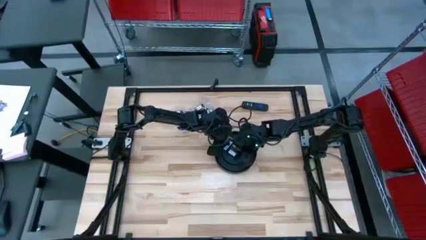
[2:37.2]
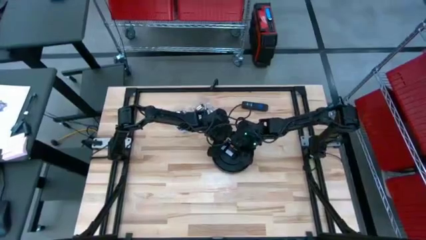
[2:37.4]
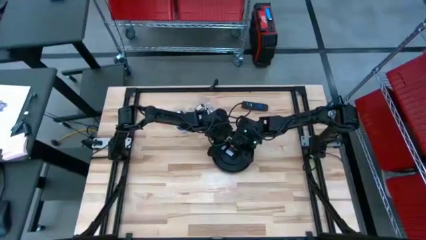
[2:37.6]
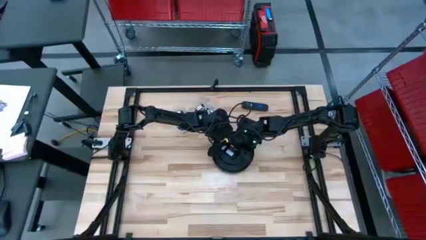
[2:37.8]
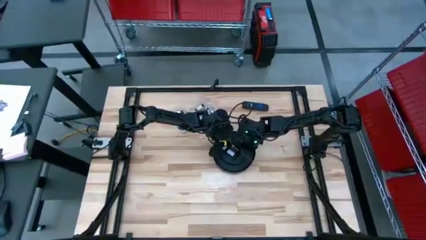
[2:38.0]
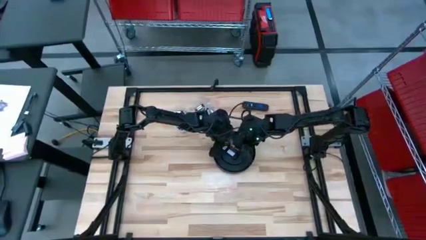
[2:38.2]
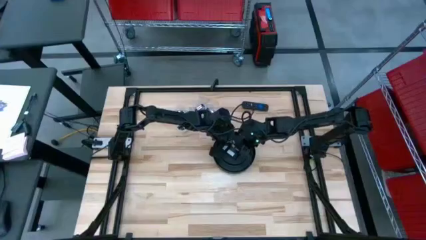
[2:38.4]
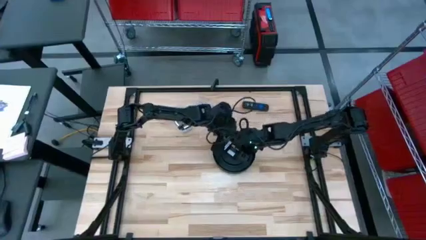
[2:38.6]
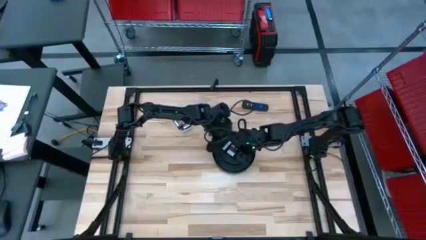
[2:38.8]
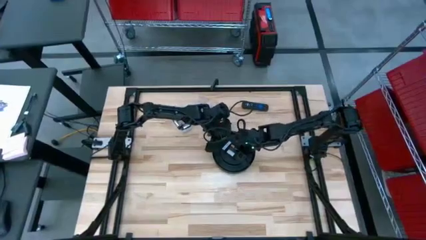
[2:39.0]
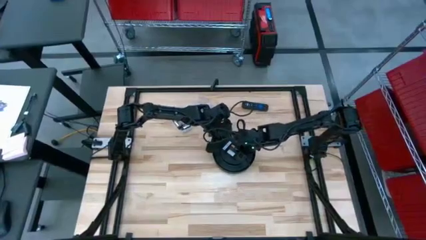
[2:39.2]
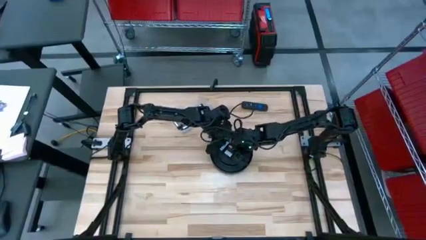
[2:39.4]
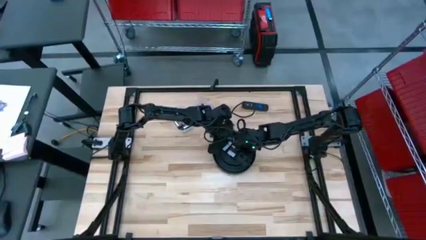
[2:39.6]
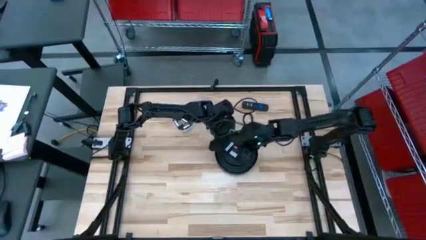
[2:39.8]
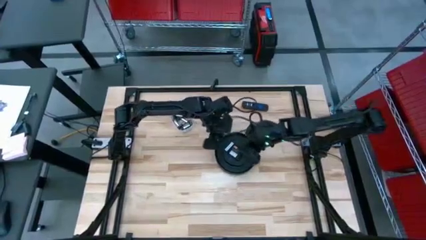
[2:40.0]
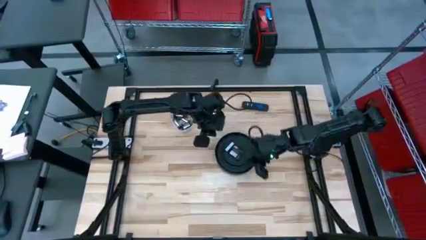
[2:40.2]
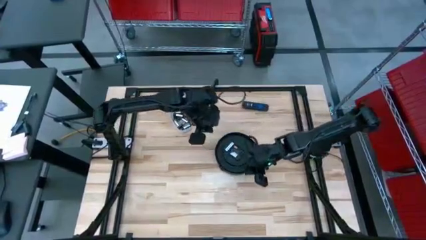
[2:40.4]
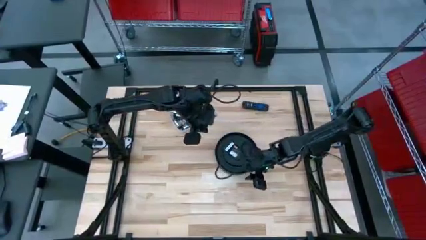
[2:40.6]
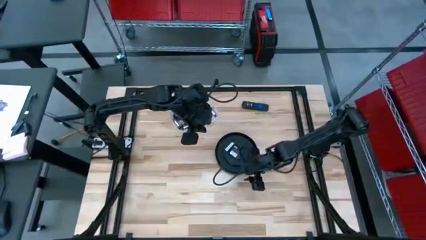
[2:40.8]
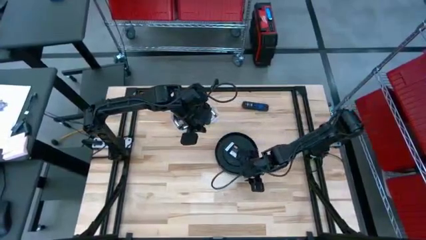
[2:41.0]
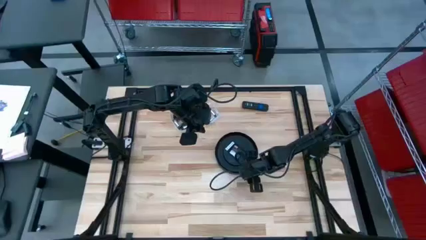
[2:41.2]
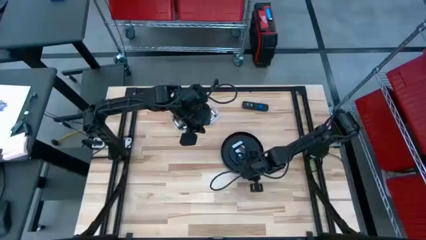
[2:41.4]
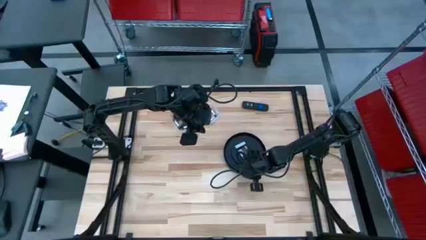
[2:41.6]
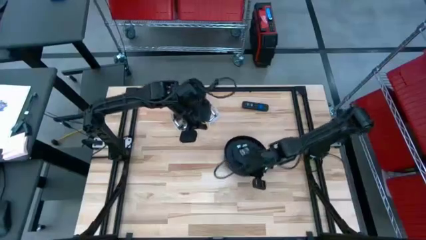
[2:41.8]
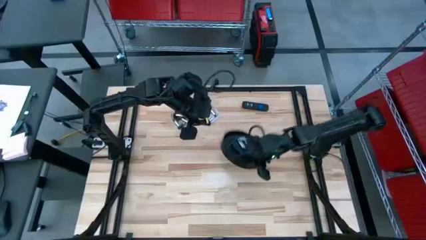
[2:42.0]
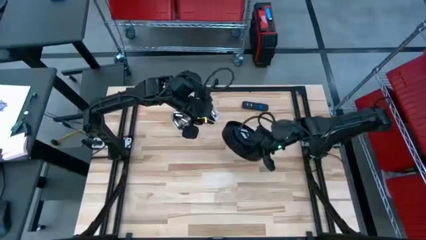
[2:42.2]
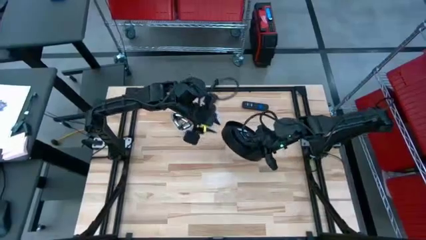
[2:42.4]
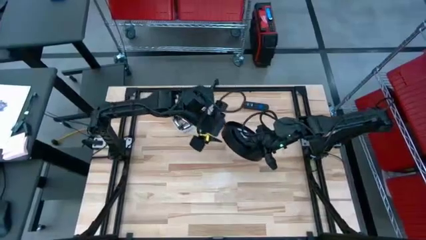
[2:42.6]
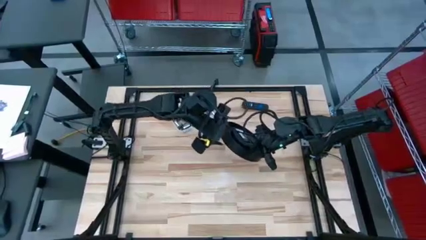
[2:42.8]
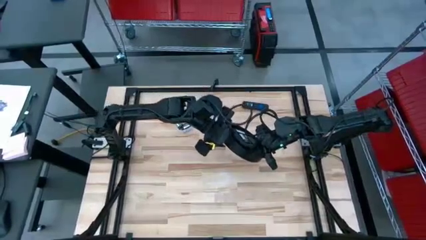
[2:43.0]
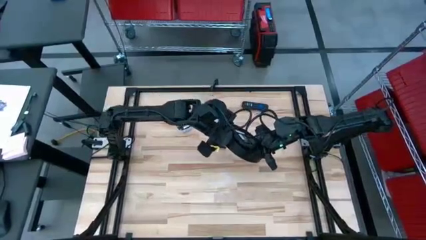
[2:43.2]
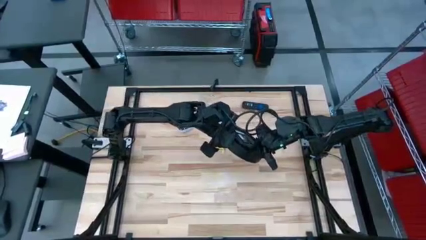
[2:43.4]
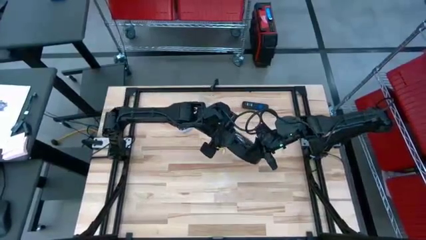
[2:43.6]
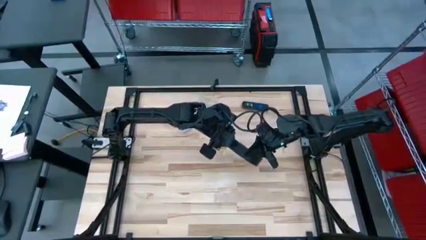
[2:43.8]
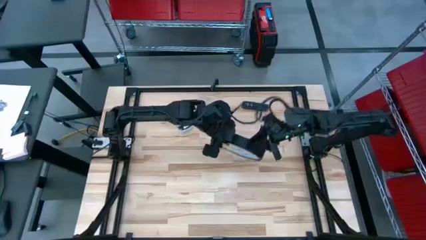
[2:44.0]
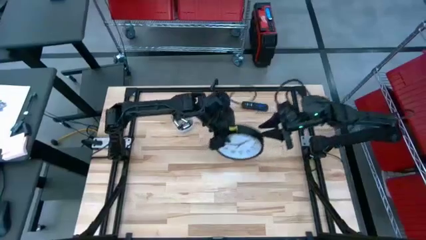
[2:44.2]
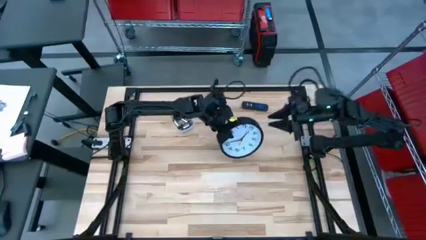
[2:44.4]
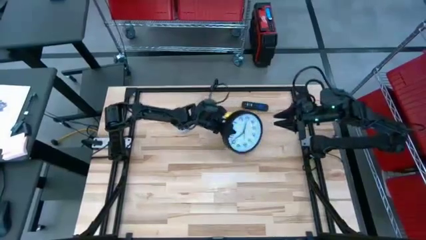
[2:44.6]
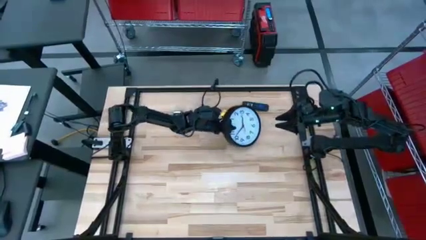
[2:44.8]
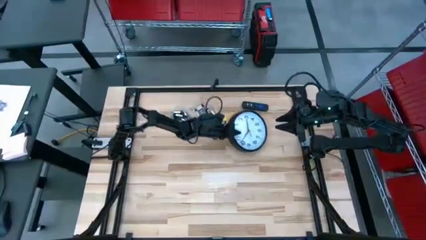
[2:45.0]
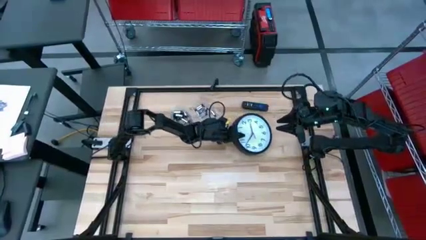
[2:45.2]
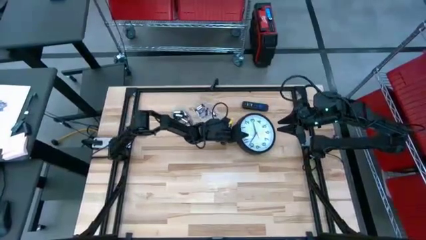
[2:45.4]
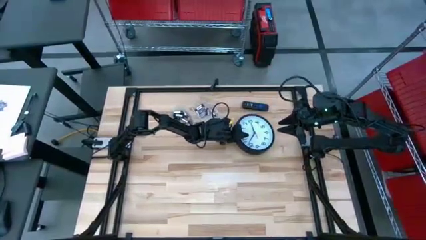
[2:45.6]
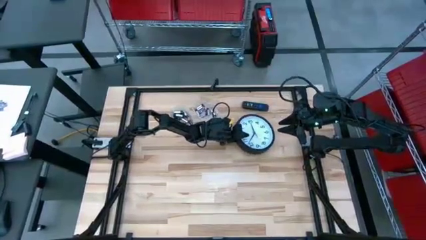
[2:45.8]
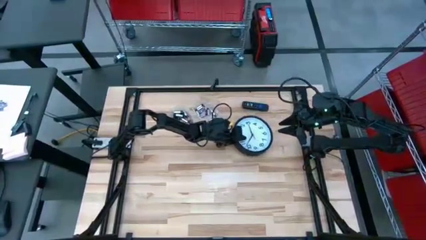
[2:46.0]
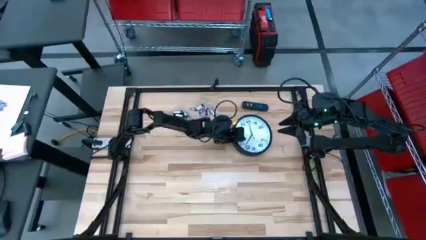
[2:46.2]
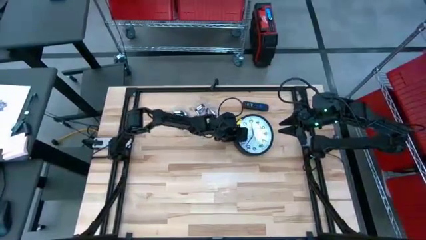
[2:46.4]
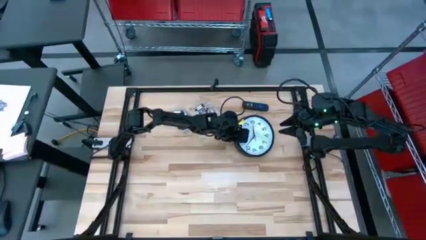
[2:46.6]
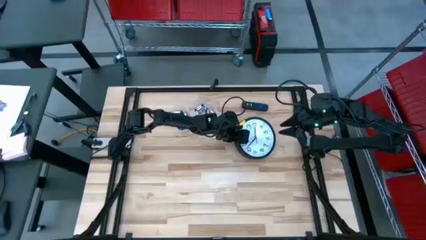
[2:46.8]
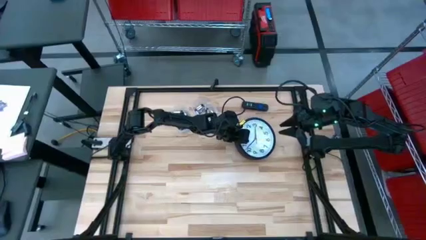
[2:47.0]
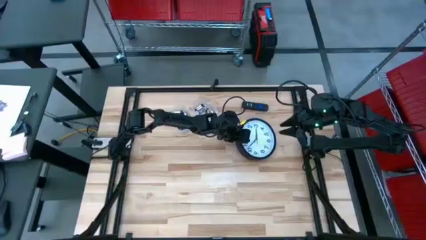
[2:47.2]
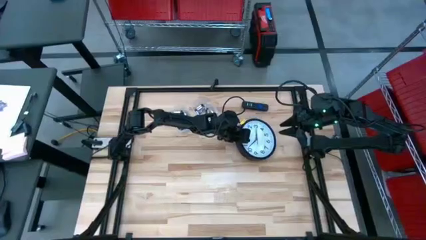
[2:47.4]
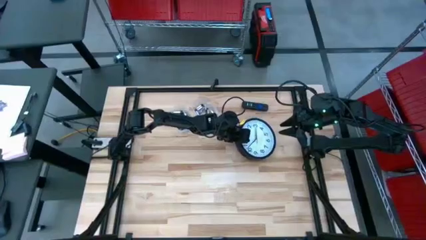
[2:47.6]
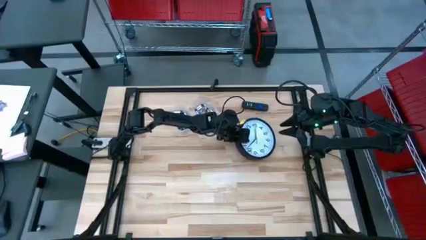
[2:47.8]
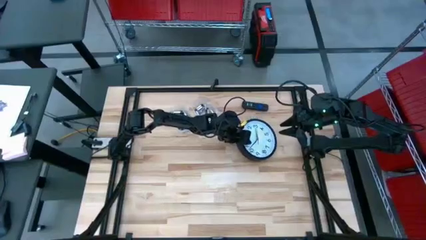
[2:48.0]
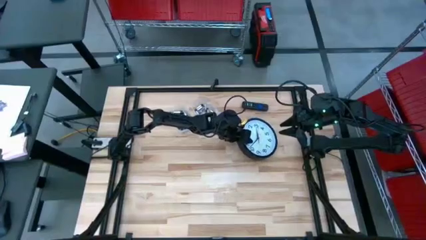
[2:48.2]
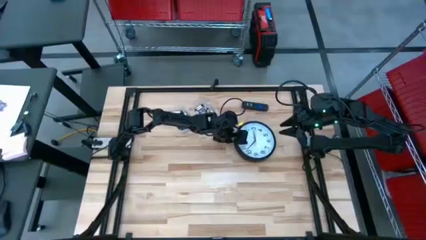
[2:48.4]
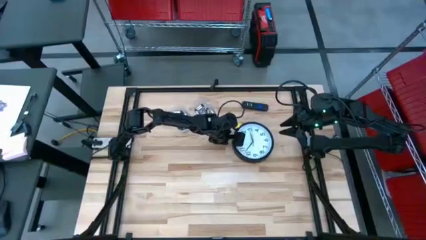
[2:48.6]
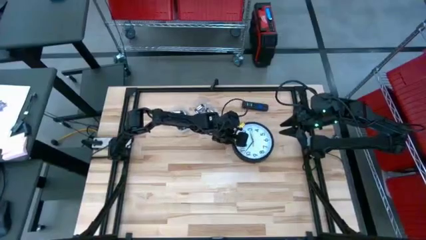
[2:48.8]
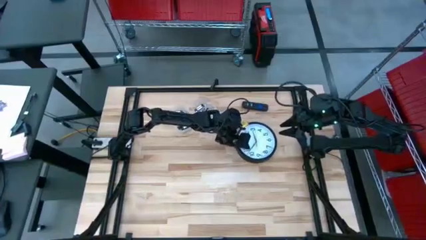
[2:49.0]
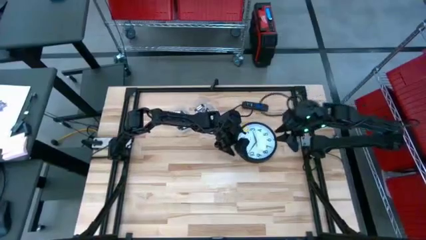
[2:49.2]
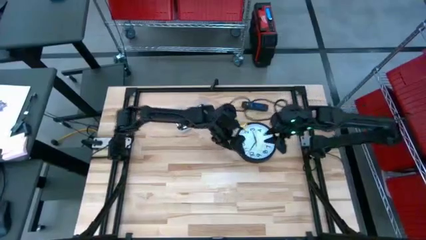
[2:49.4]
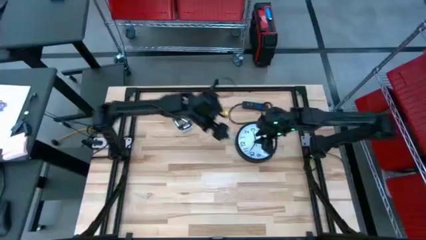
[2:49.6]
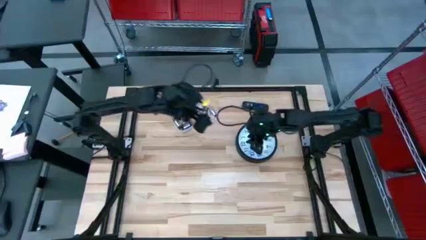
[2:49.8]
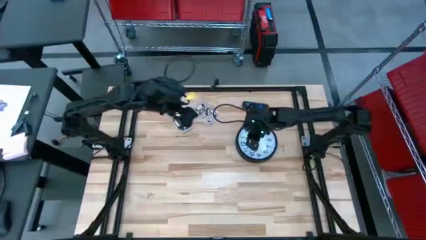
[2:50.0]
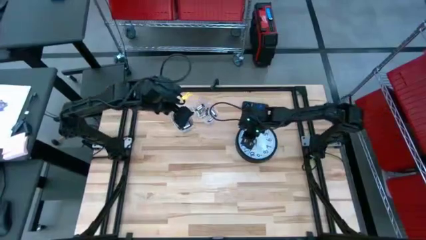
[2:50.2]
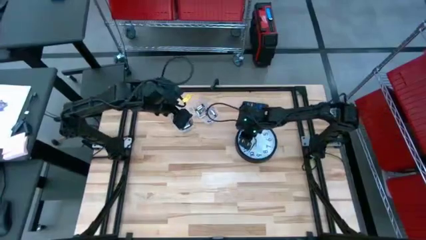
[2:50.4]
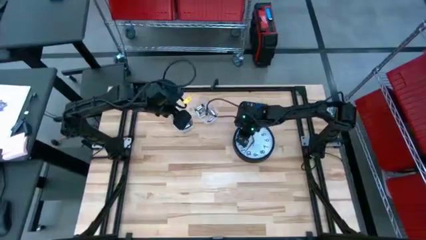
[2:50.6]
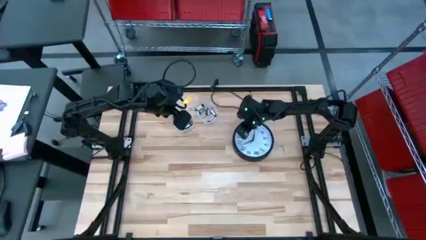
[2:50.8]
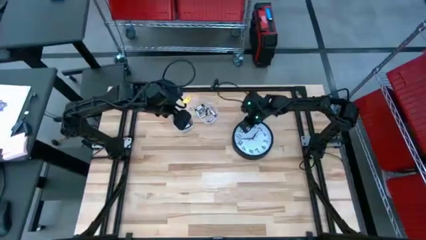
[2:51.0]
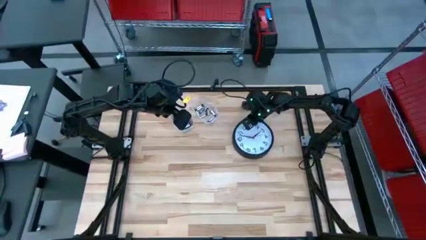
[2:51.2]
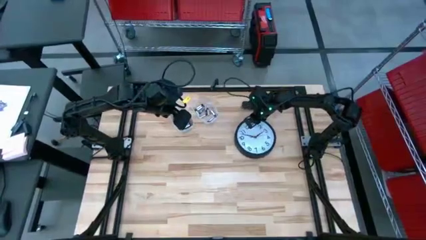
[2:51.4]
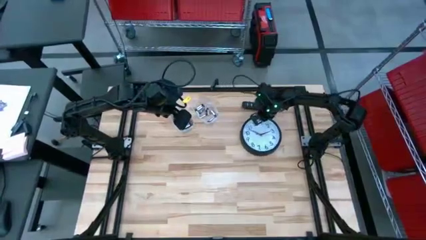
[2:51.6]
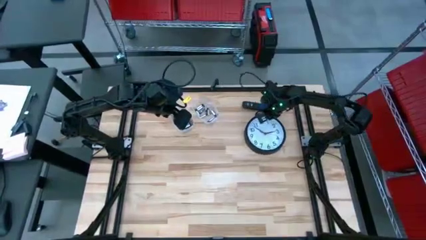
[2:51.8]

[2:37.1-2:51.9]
Task: Insert battery
Insert the black battery into the wall clock

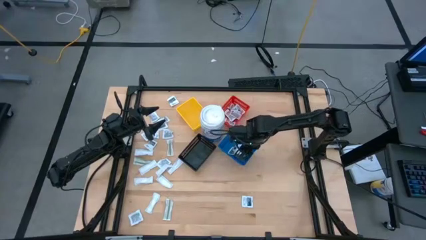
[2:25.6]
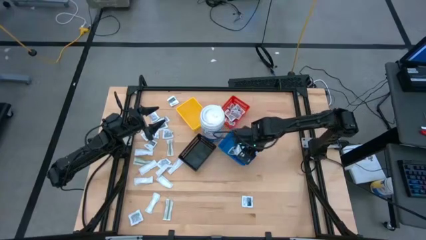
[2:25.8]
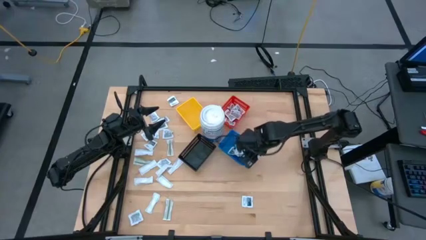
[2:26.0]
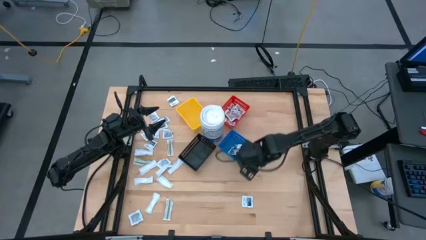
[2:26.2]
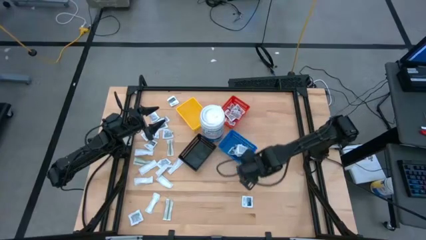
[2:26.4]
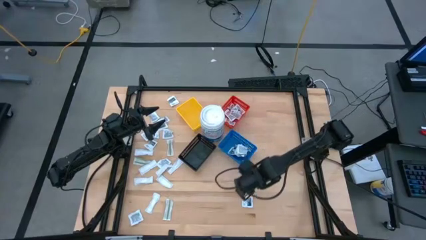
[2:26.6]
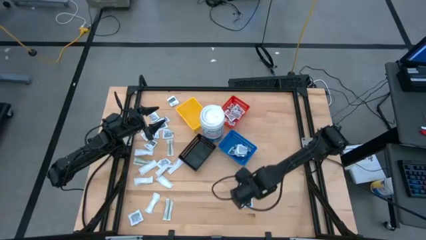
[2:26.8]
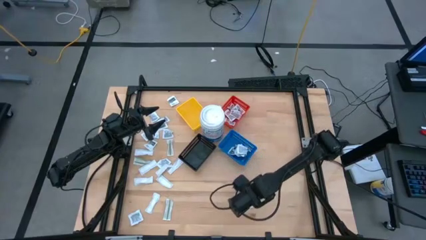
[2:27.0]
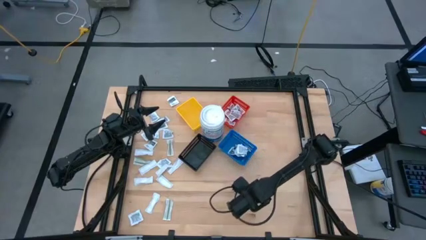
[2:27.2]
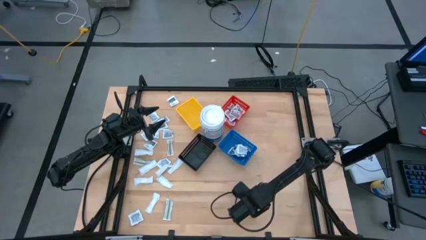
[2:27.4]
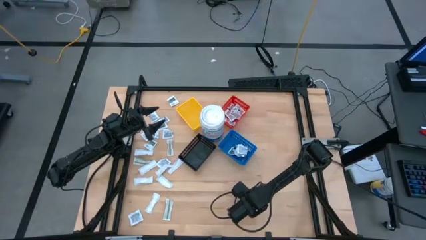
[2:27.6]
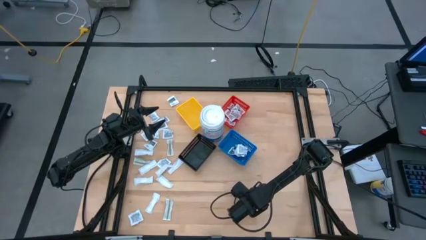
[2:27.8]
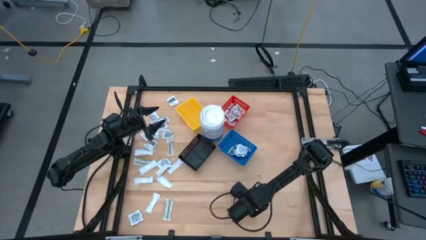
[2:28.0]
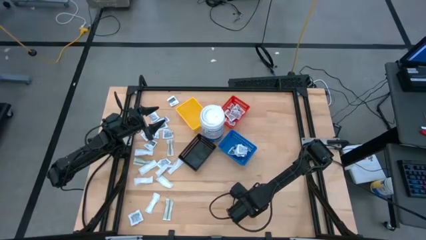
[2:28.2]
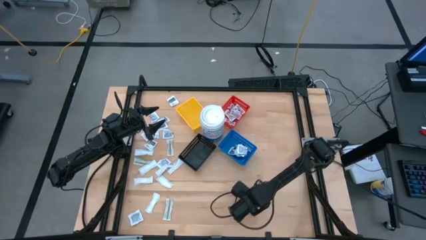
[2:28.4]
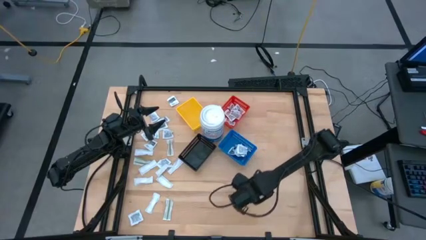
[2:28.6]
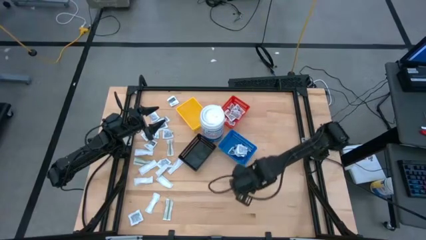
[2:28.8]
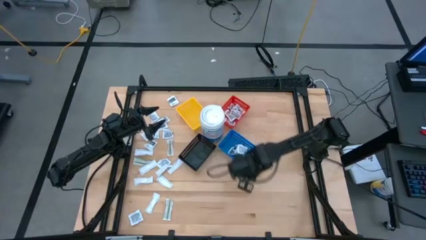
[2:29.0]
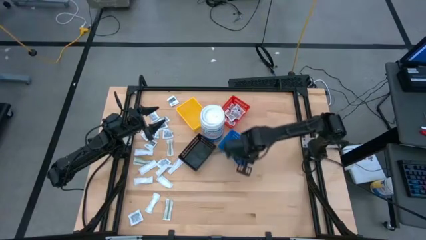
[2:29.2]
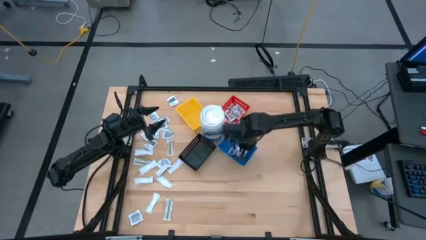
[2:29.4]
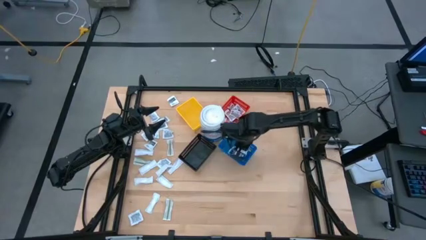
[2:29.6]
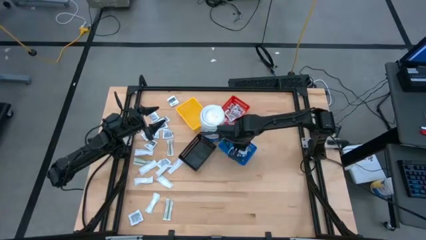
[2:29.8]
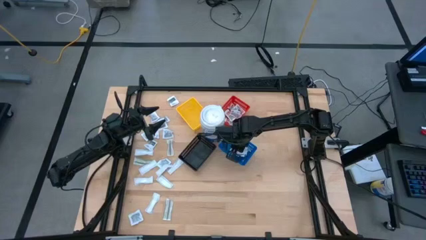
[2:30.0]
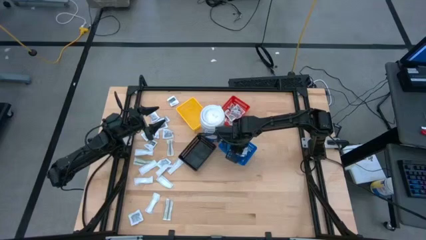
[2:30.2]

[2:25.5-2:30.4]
Task: Pick & Place First Aid Supplies
Put the alcohol pad into the blue bin
